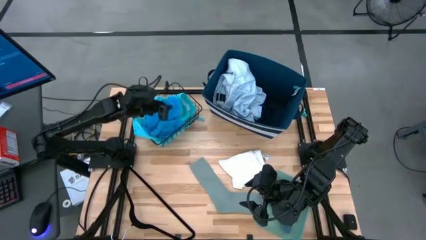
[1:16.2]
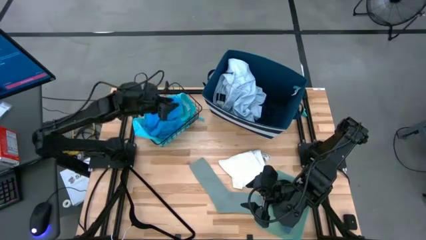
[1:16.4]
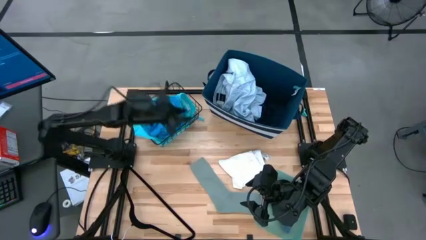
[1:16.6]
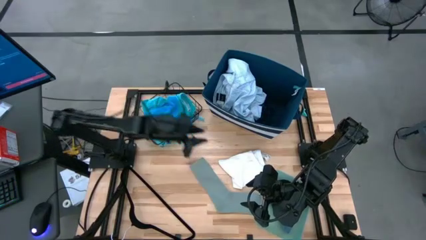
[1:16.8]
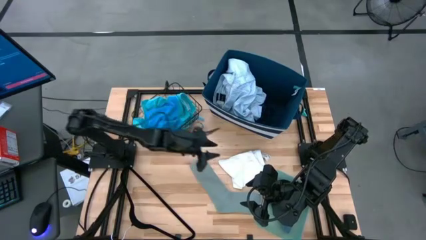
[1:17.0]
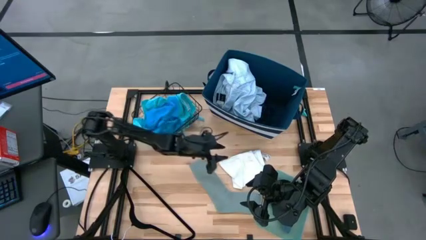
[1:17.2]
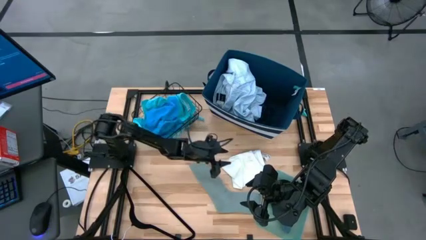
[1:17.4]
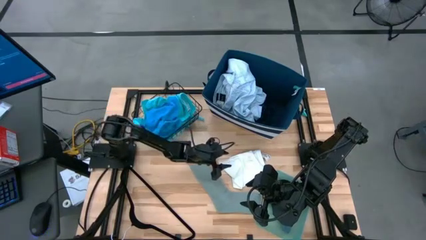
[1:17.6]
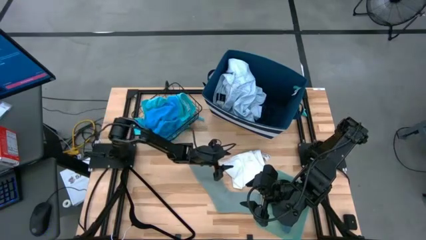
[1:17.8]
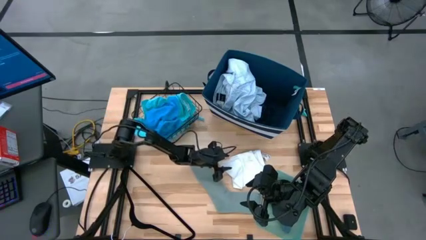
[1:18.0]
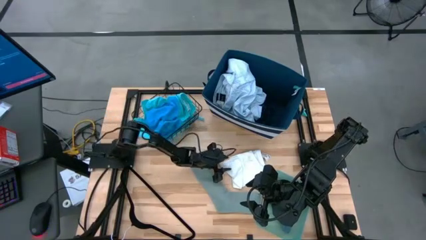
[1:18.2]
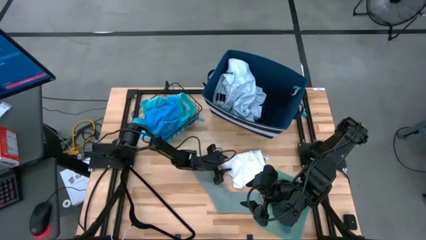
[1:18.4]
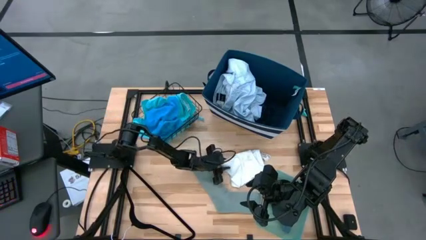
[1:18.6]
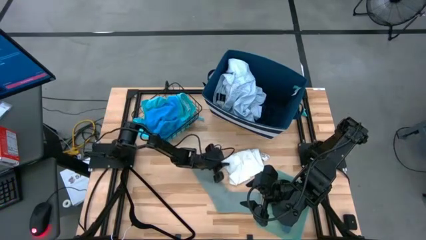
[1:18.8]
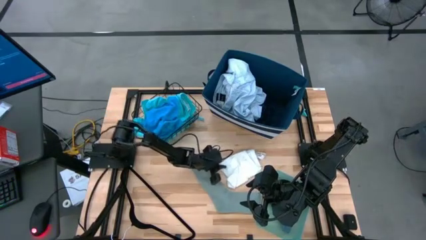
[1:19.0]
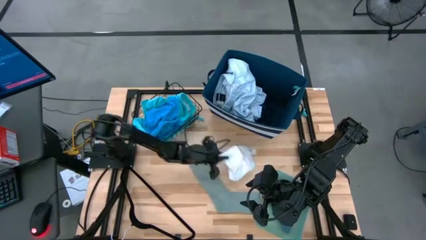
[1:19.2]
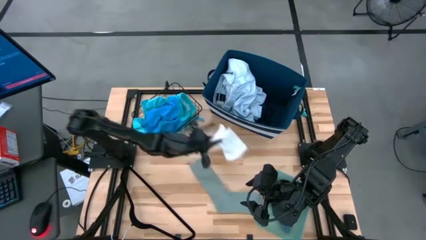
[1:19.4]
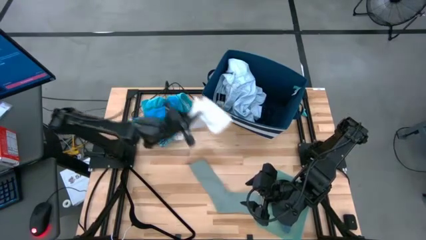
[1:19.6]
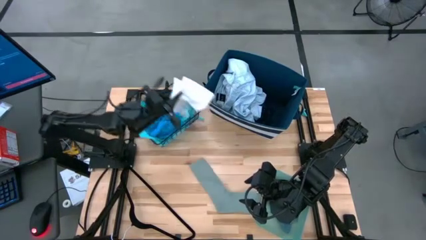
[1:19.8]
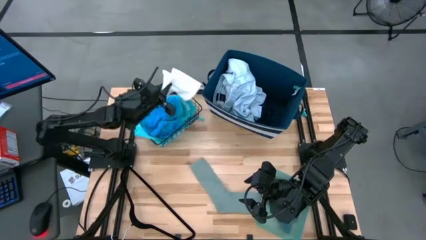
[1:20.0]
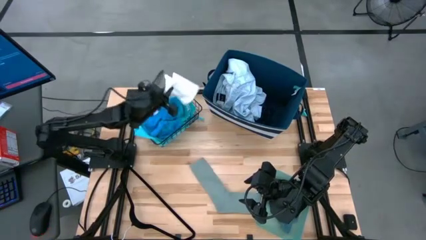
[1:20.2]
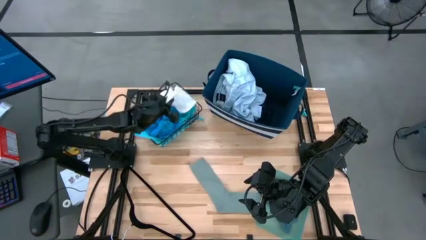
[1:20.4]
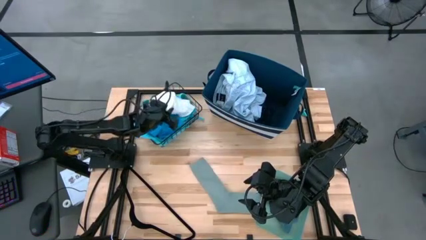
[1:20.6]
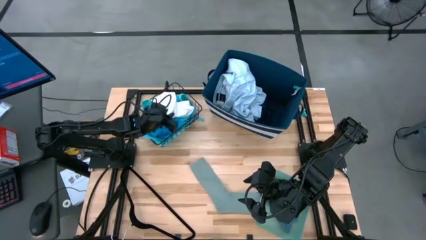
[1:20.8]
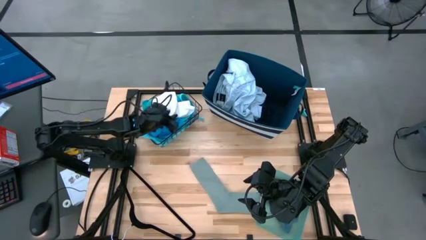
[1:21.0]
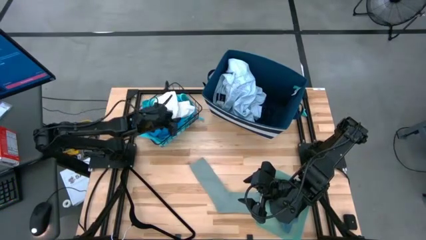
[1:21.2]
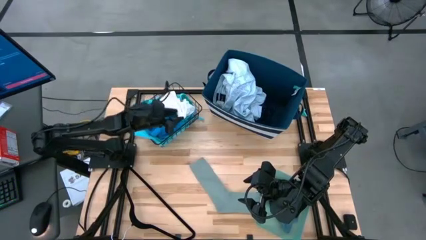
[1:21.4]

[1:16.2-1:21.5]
Task: Pick & Place Cloths
Put the white shorts into the black wire basket

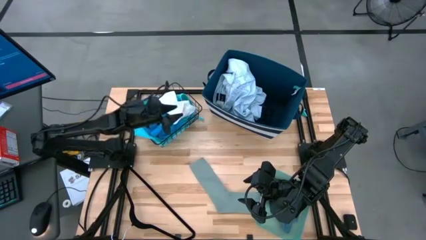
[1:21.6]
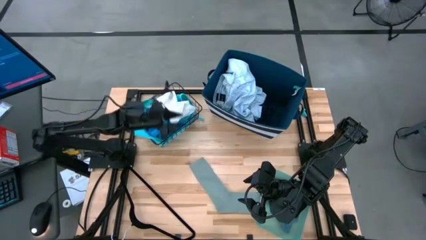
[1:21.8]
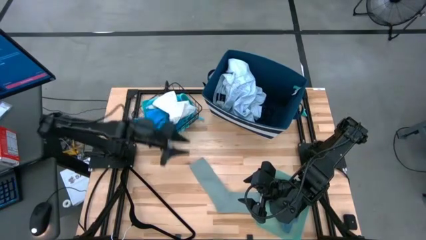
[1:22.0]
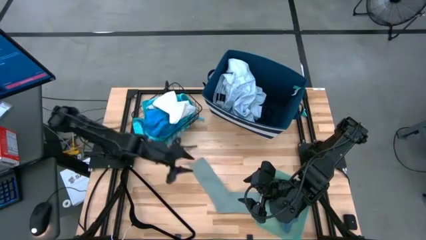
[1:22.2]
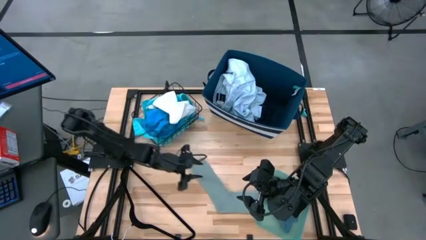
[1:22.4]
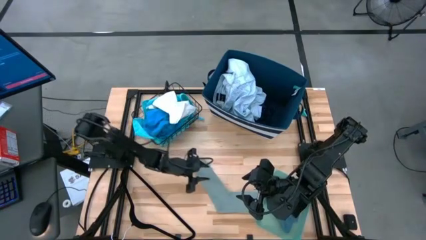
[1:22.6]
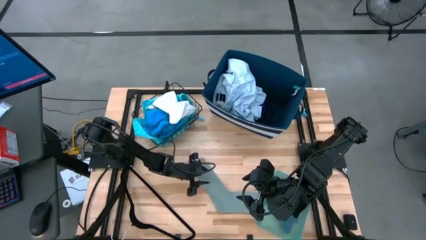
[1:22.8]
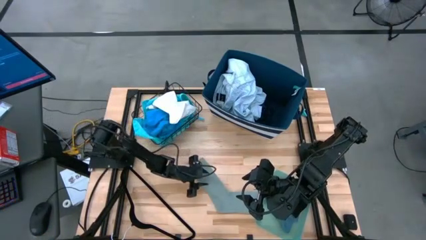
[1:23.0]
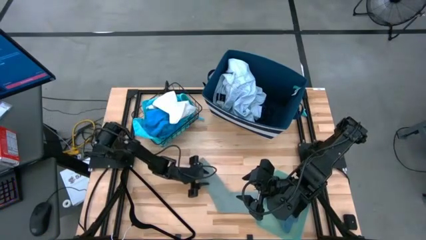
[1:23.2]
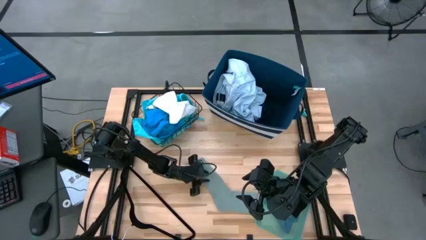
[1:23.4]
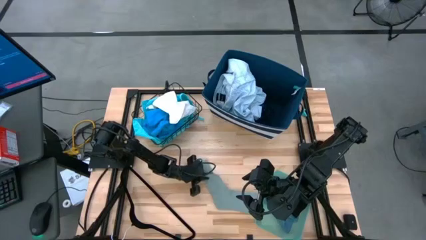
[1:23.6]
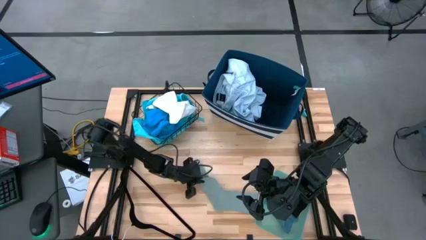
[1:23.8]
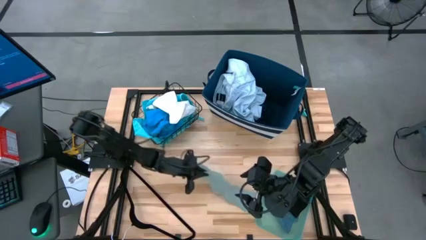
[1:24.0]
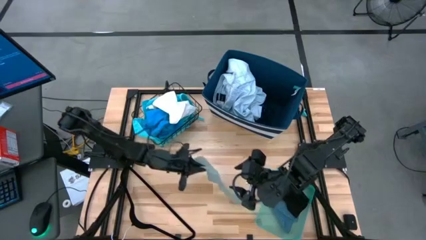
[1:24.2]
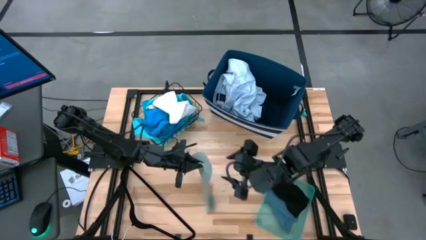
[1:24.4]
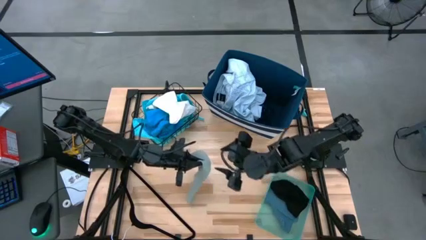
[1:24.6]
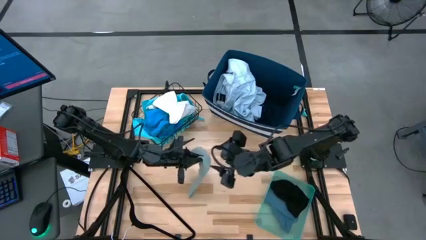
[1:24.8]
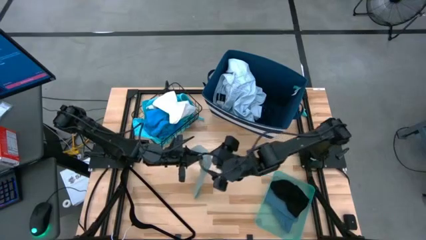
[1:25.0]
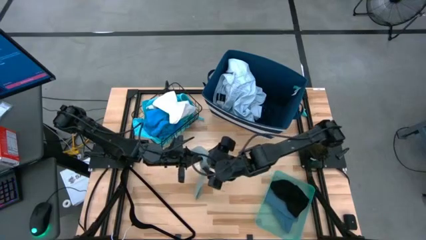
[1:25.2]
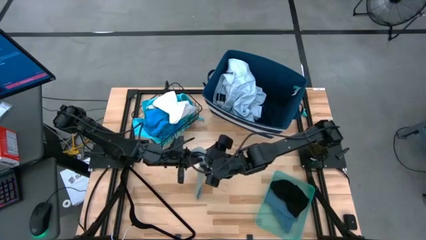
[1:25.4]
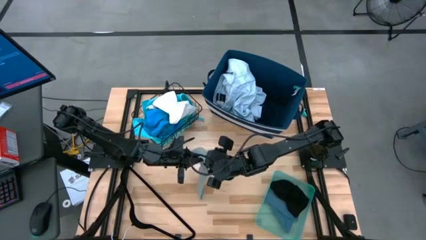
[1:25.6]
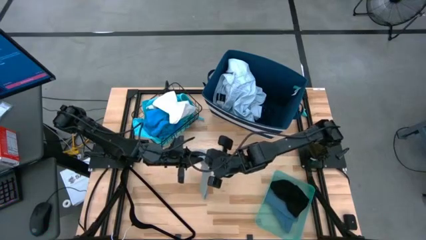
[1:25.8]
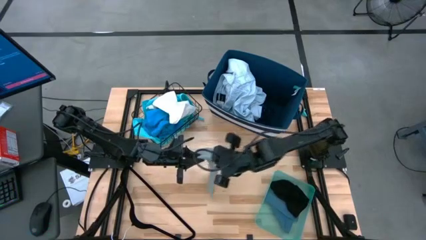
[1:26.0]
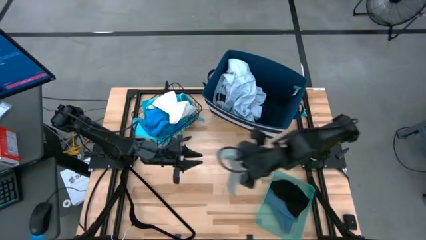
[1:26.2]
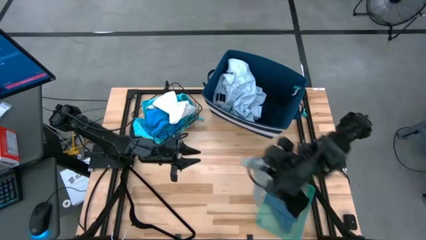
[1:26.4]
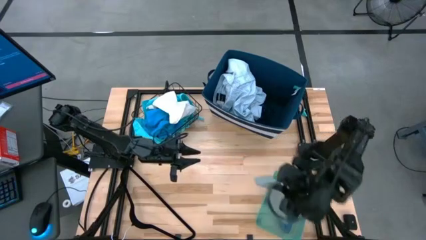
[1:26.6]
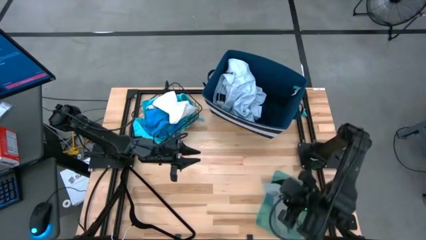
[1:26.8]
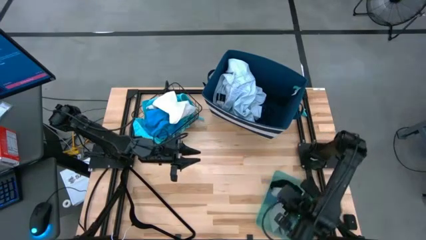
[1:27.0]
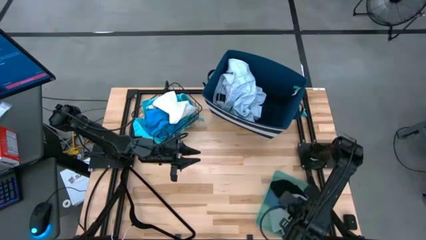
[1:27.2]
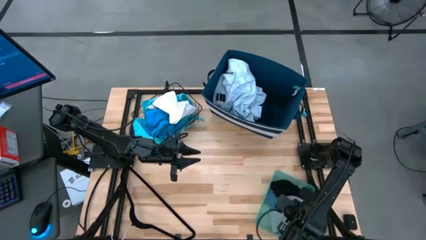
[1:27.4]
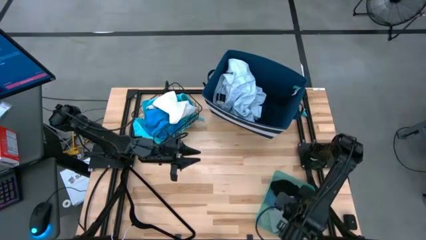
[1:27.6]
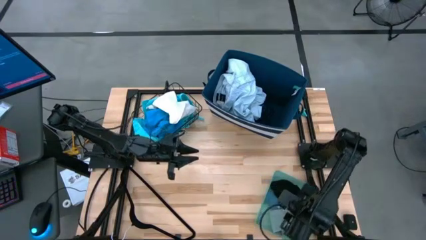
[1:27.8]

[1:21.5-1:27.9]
Put the gray sock into the green bin

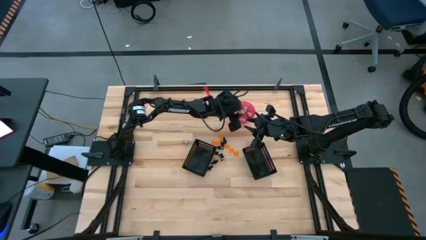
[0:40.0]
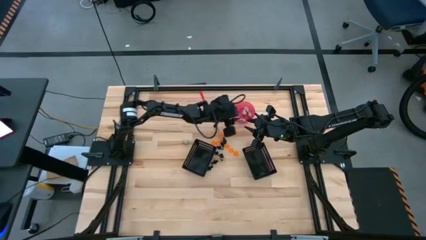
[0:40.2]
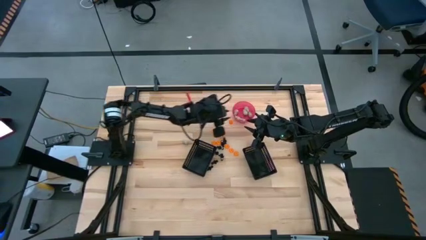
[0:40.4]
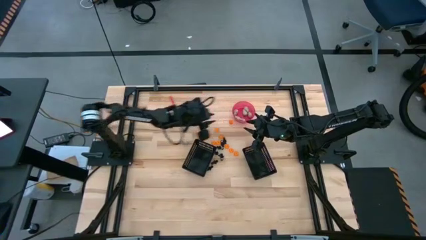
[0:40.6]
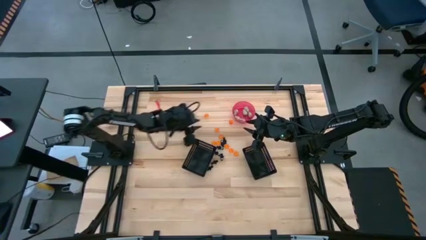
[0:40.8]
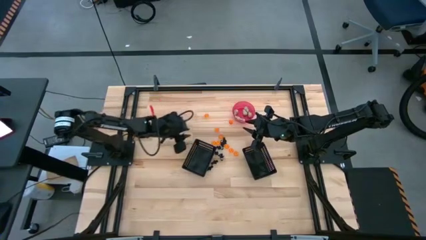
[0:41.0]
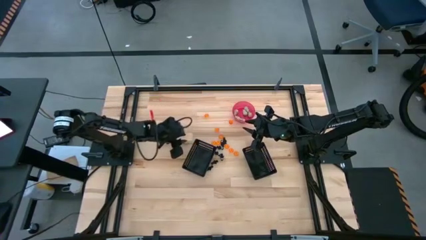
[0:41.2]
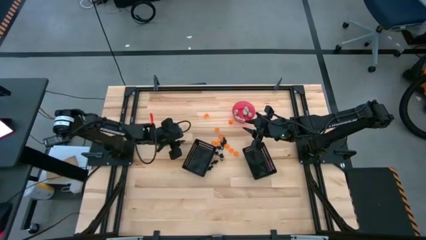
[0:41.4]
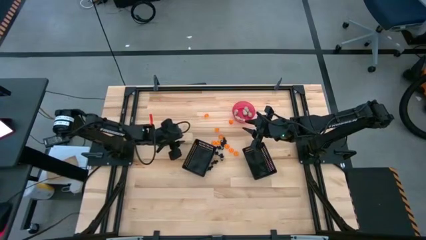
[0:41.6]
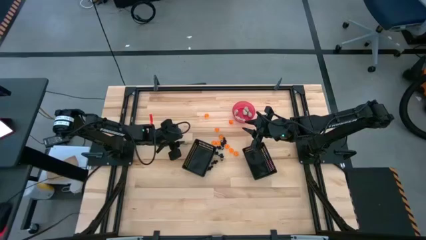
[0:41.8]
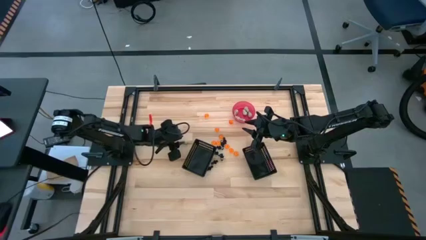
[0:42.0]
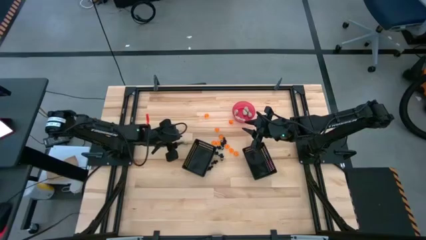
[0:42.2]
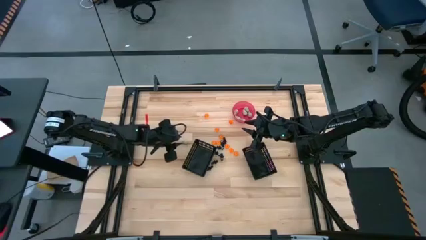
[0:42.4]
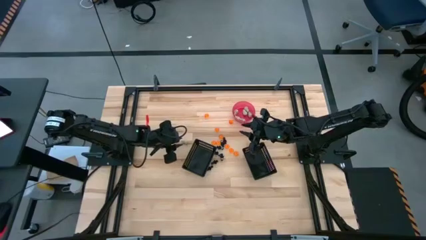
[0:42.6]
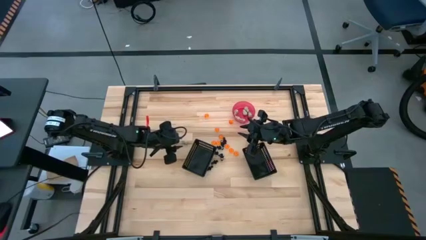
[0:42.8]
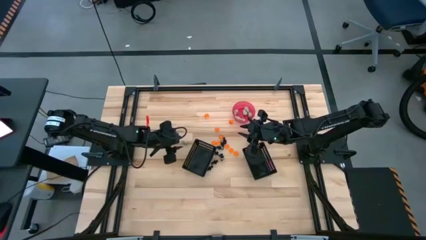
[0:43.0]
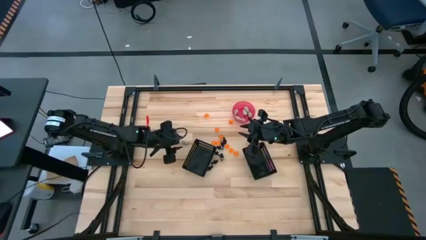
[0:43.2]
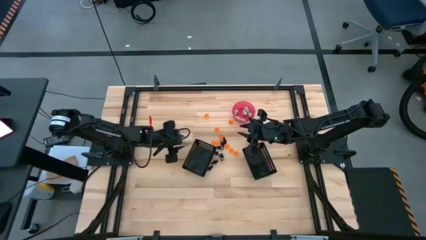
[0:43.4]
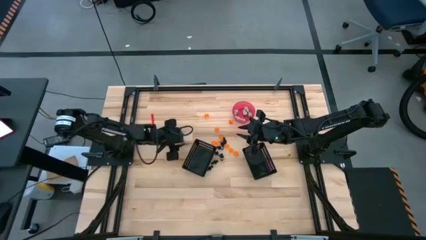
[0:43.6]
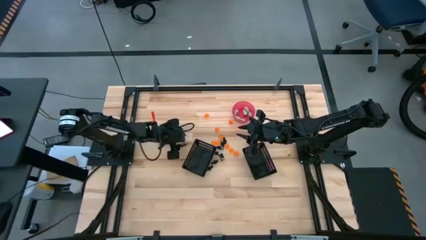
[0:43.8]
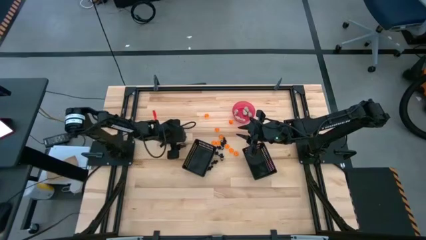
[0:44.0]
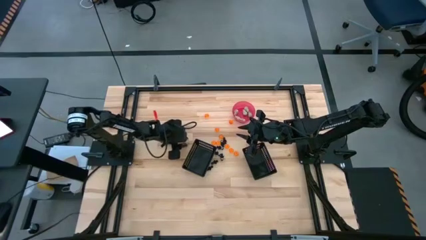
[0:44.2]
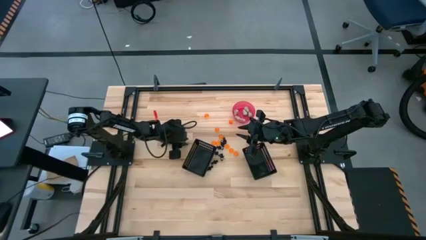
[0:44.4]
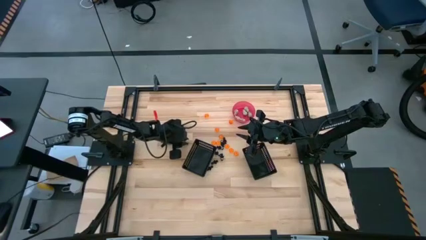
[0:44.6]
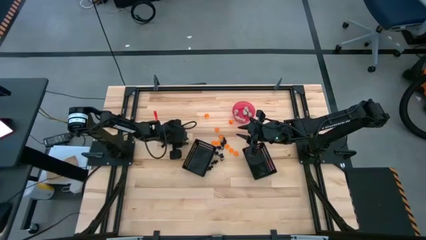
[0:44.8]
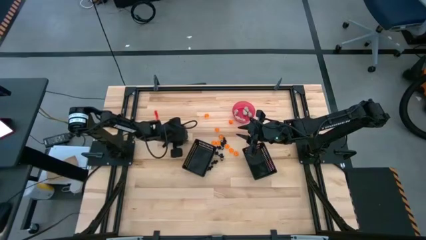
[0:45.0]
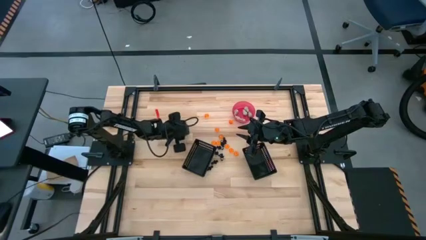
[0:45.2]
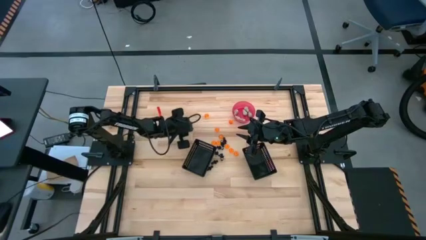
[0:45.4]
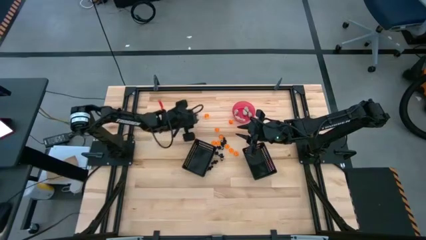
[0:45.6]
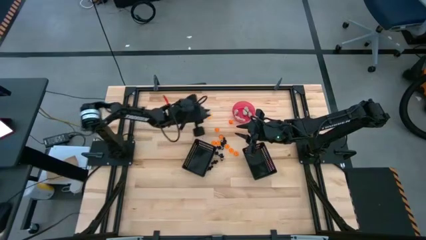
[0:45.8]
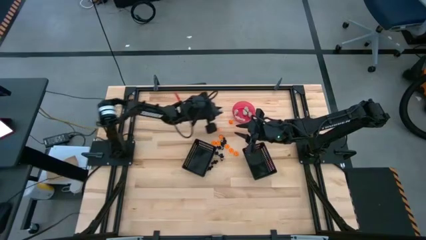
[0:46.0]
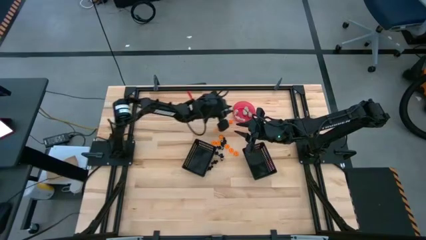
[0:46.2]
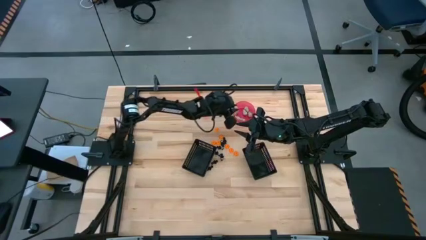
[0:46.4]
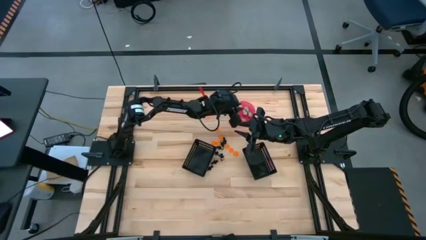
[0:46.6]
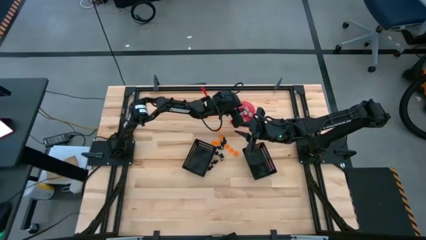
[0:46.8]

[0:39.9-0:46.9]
Task: Sort Halloween decoration
Put the white skull toy into the pink container
